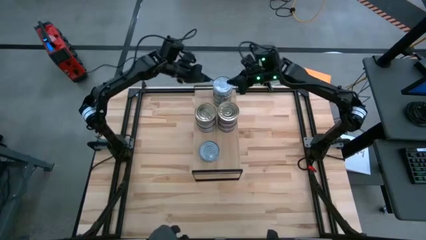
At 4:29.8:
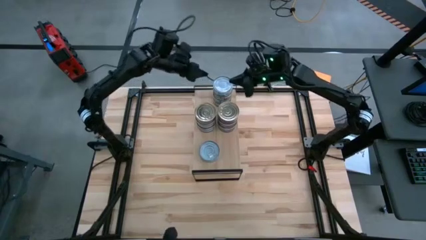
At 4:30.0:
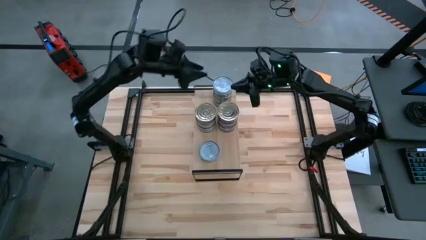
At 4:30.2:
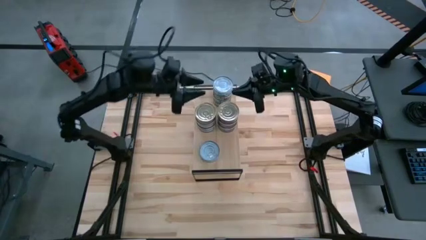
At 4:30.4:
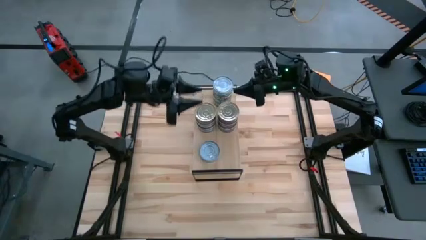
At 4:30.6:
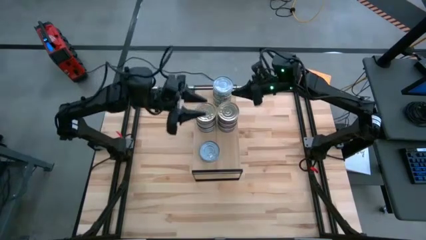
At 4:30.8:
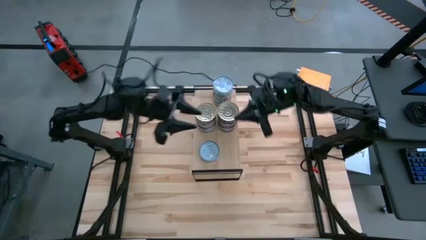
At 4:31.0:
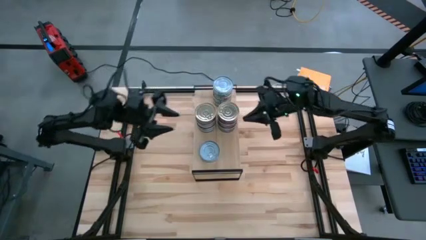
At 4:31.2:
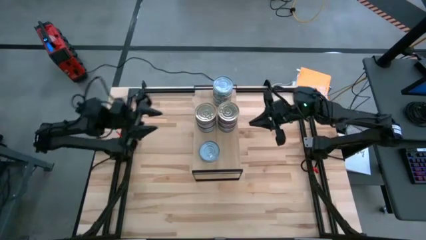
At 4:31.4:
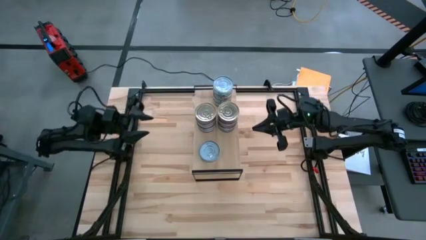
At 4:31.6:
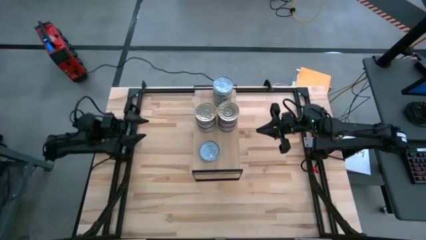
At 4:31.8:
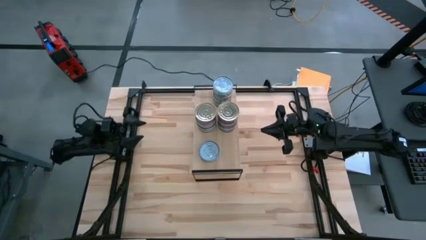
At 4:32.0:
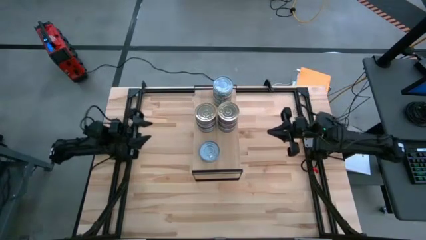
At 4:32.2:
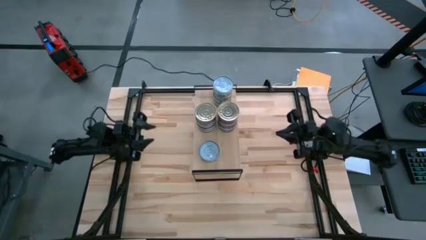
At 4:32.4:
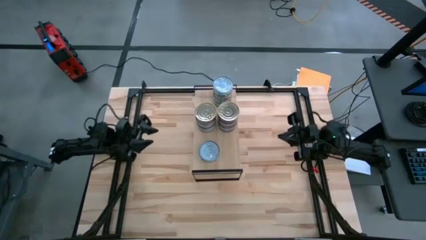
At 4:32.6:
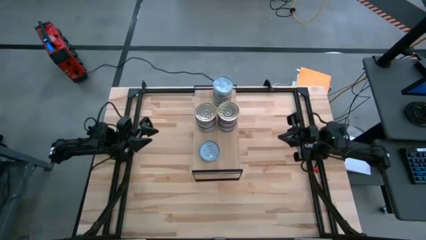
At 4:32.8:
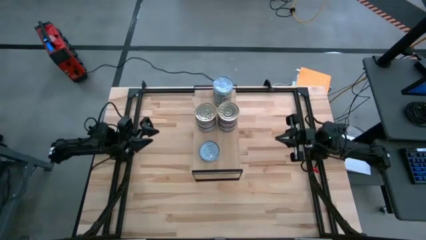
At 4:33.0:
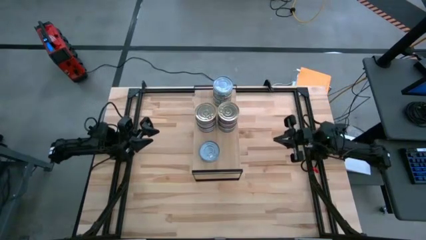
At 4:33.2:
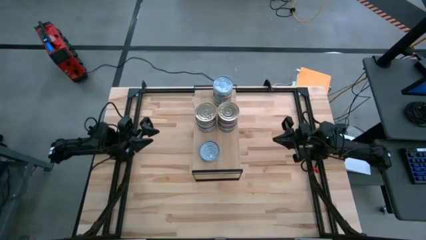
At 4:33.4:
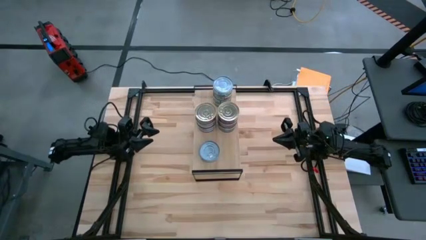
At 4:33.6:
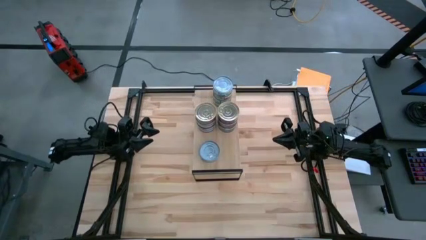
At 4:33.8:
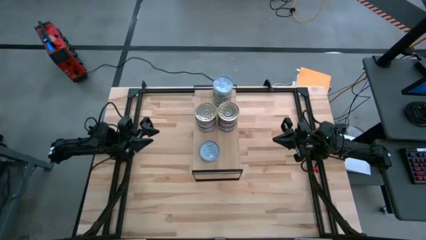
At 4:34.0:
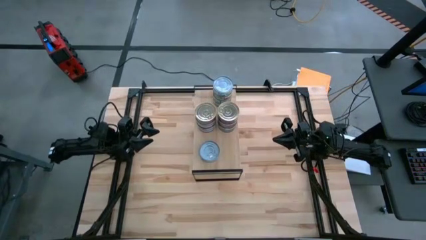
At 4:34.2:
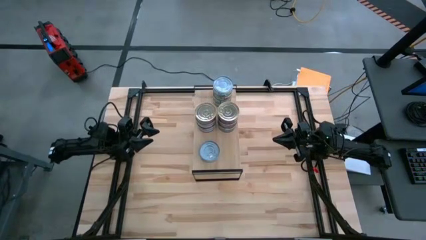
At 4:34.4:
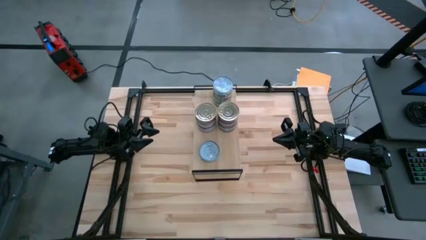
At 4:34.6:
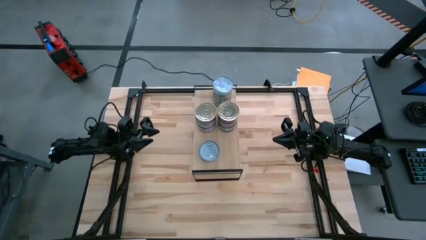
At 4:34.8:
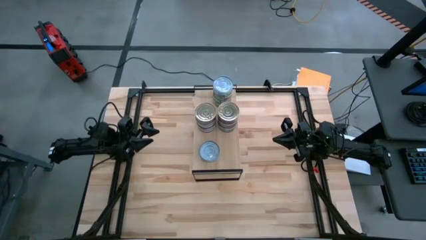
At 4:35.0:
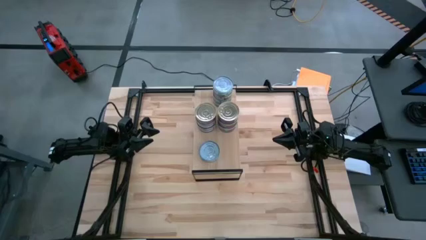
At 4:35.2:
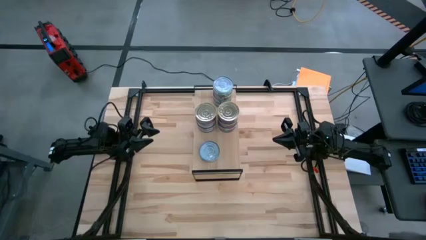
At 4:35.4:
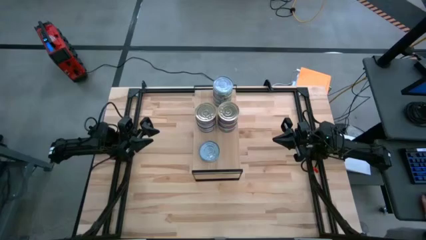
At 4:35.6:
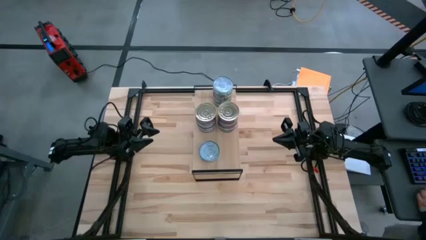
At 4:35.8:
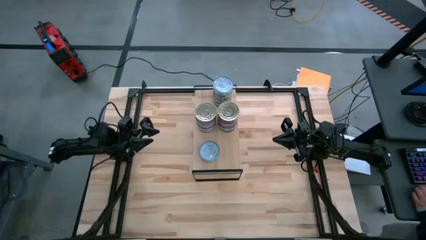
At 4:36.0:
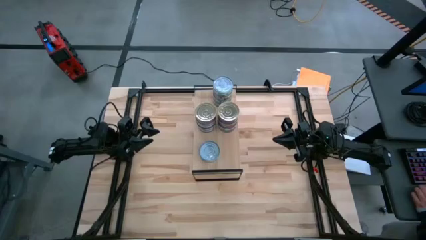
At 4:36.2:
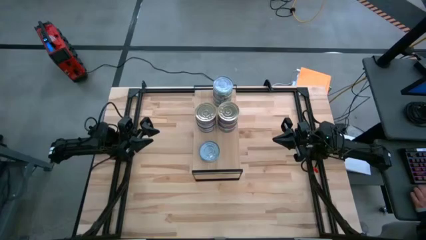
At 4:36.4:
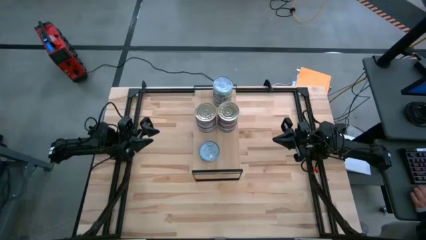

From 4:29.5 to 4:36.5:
Task: Stack canned seafood by type on shelf
Return to Home Position
